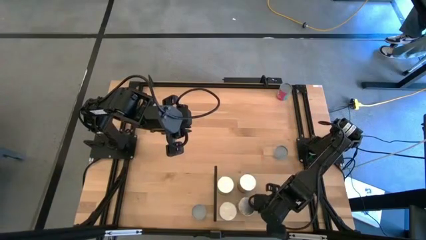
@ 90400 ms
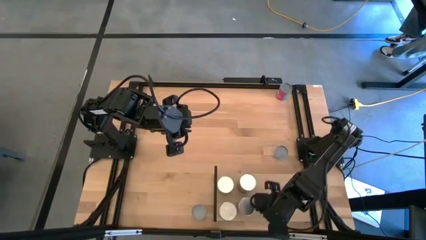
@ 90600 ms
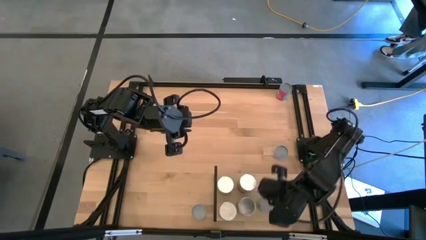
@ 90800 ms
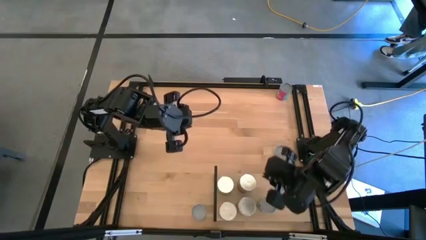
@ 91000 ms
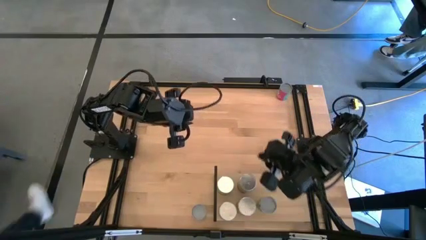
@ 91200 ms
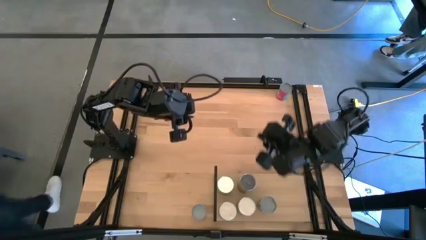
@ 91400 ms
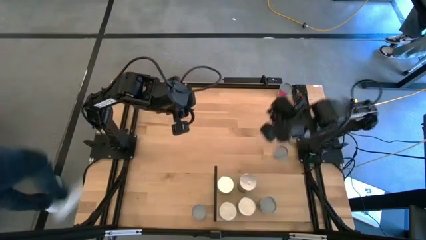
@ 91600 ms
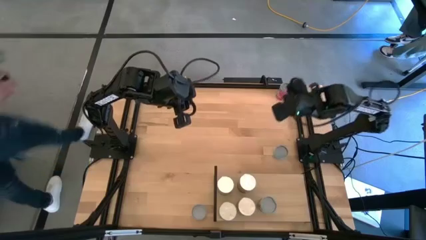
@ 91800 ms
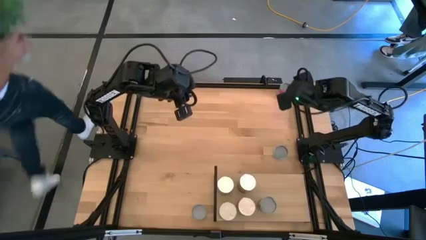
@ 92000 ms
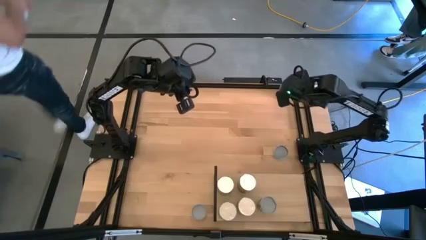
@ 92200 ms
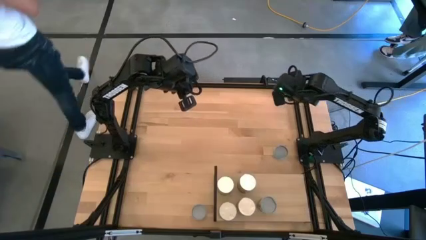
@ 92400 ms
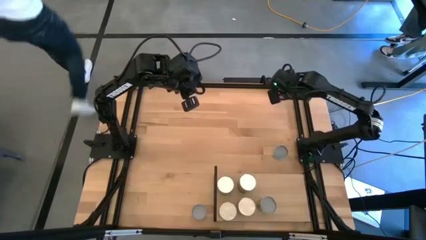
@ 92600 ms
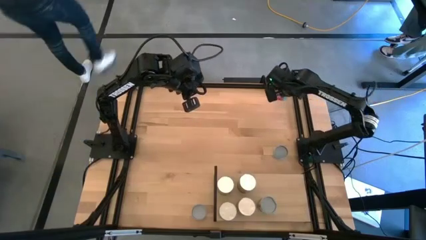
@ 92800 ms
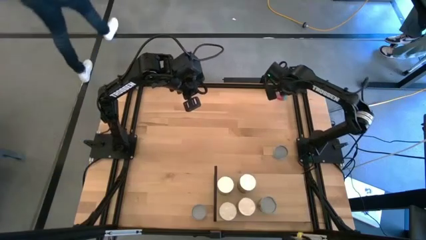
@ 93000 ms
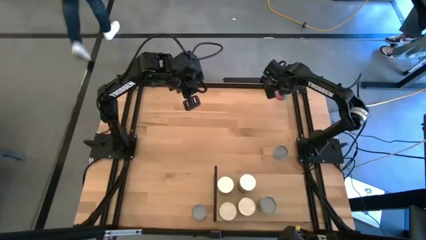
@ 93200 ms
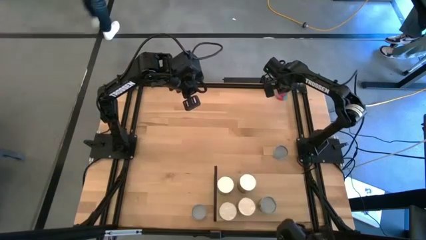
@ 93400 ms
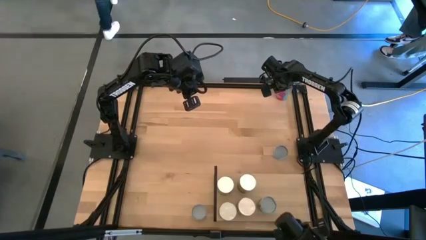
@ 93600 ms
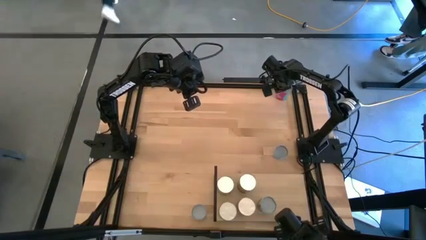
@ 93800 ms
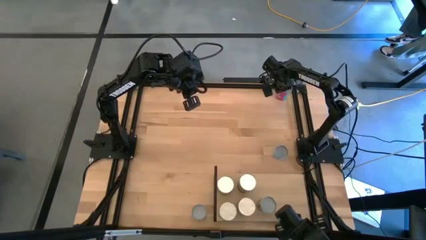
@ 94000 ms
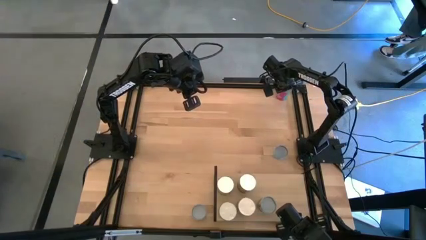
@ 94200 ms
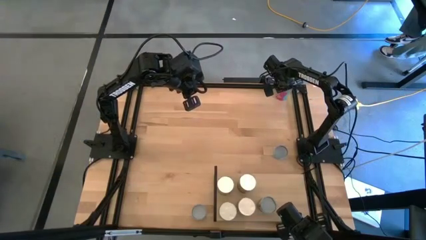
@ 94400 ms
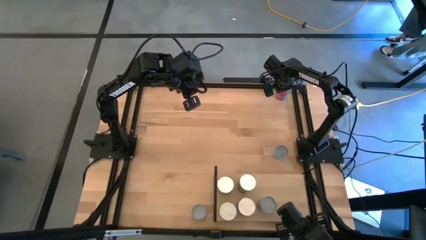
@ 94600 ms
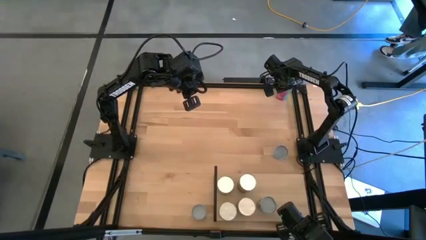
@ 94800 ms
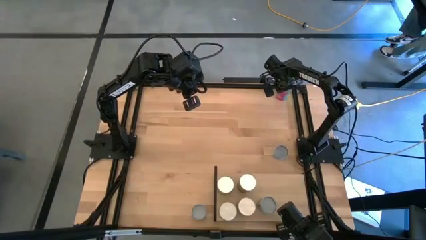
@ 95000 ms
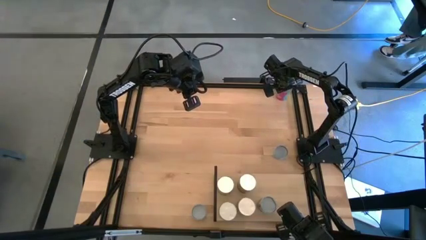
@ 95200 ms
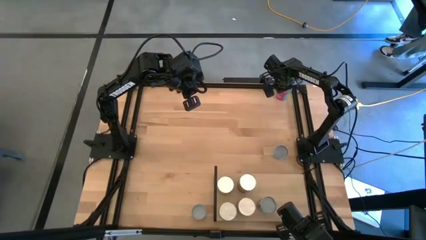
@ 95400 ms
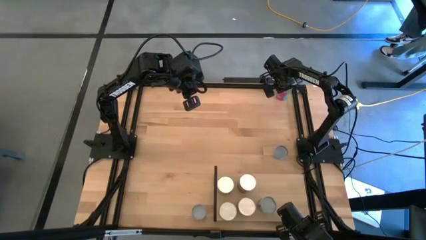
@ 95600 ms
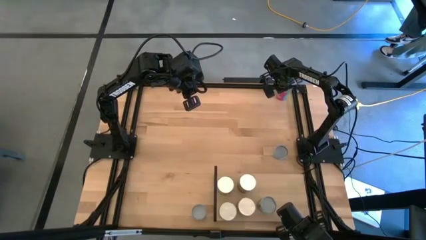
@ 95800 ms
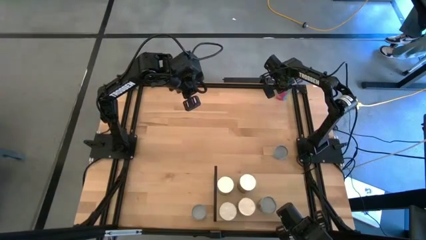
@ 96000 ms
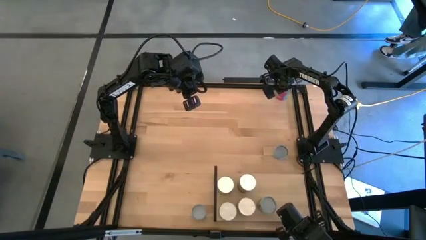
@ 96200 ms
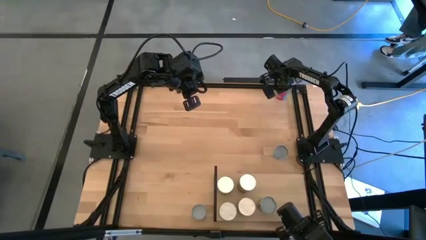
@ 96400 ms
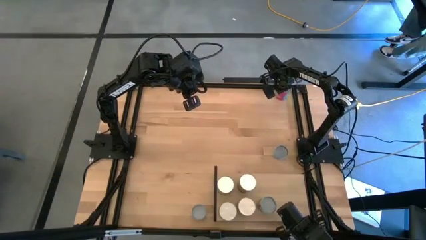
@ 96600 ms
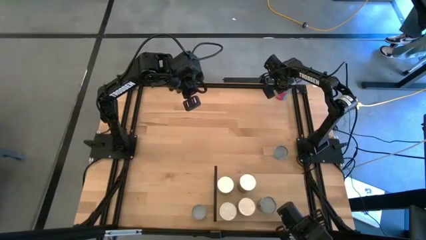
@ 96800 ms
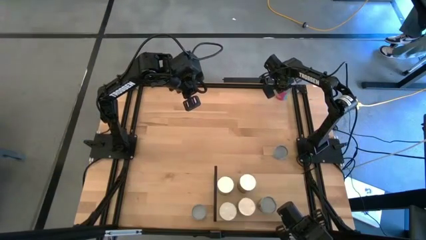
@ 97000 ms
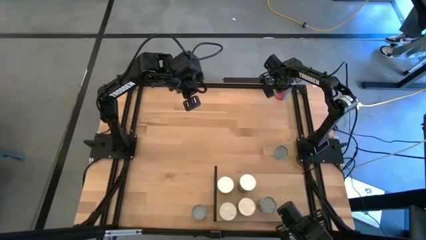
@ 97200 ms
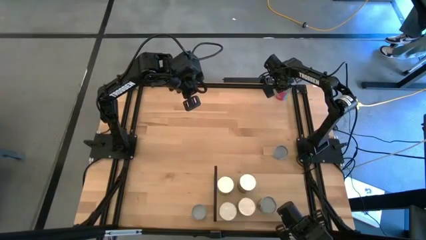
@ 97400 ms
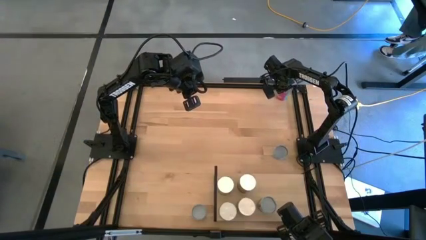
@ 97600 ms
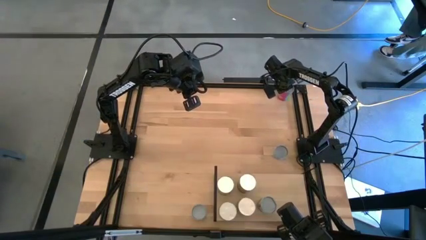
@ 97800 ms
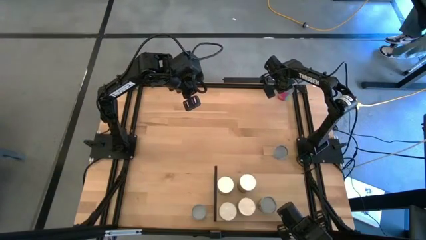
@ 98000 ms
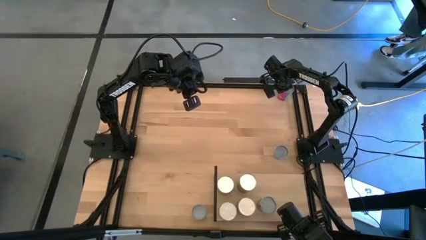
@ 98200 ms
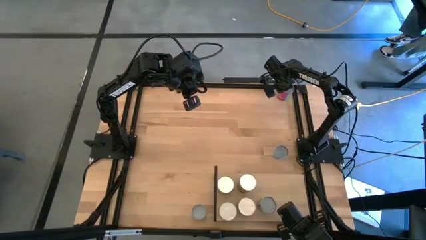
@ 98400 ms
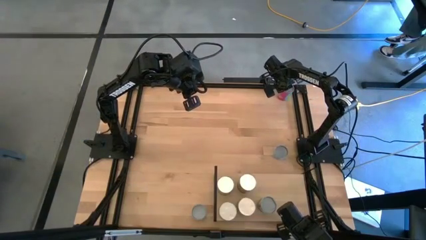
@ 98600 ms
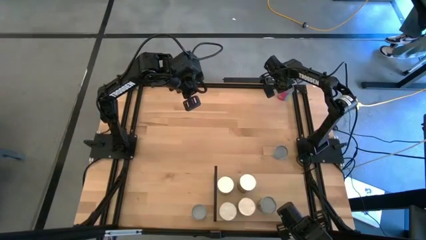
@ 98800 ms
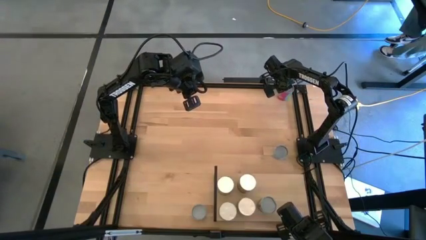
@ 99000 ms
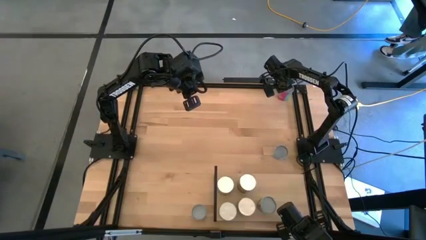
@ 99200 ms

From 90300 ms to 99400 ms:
Task: Pick and place cans onto a shelf
Put the canned chicken soup on the shelf

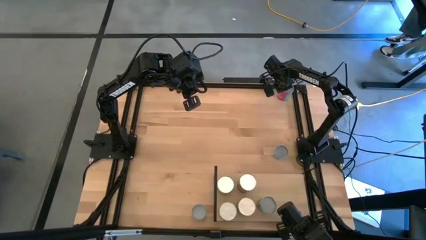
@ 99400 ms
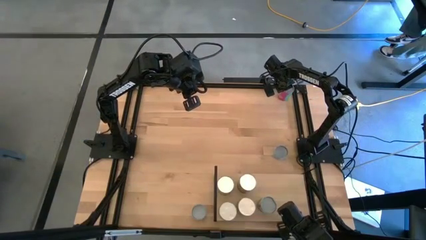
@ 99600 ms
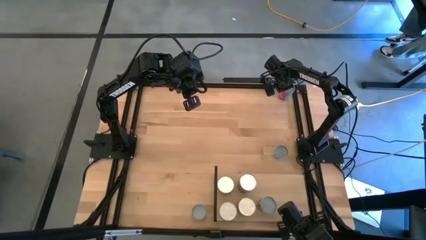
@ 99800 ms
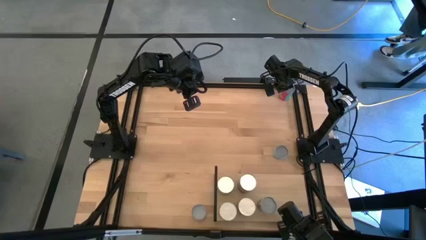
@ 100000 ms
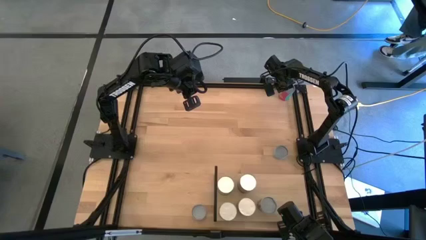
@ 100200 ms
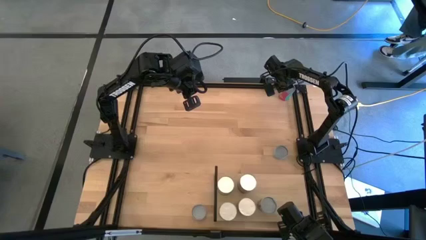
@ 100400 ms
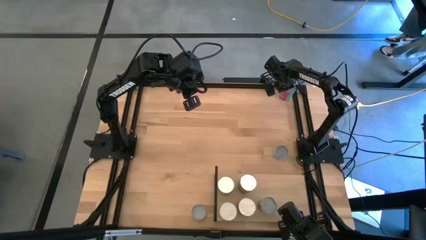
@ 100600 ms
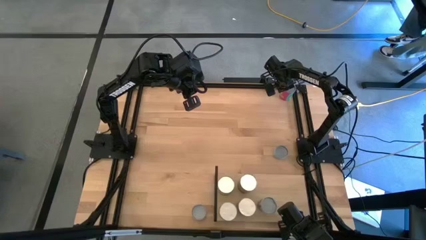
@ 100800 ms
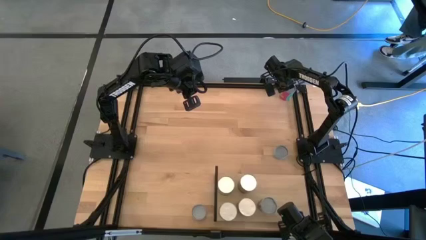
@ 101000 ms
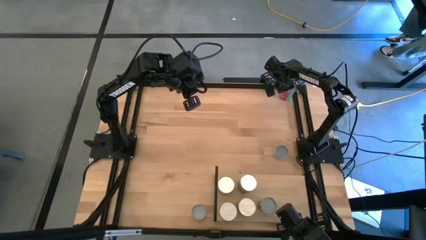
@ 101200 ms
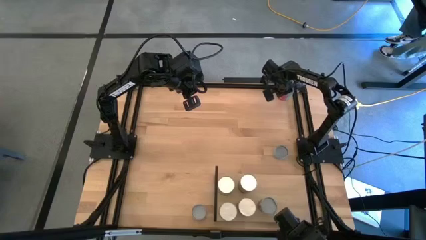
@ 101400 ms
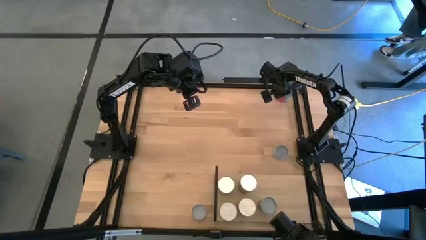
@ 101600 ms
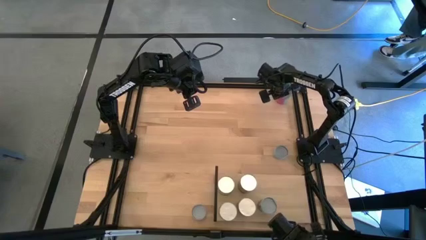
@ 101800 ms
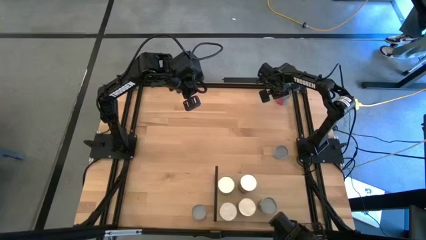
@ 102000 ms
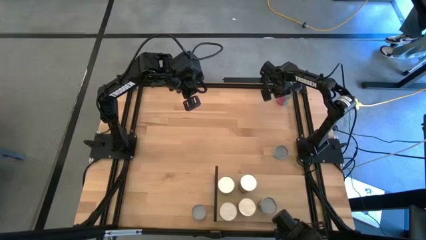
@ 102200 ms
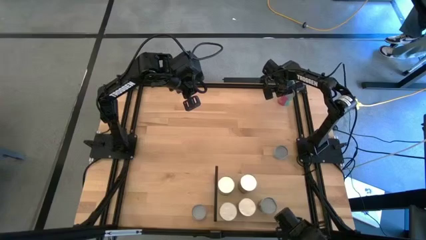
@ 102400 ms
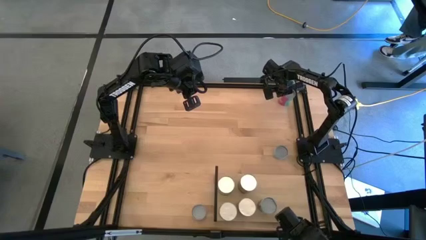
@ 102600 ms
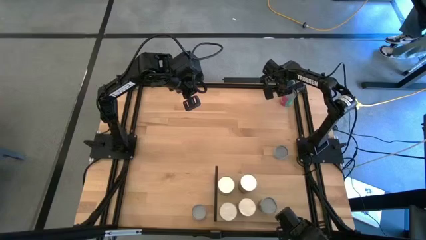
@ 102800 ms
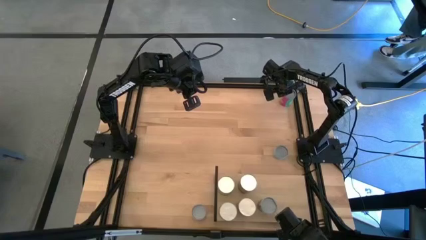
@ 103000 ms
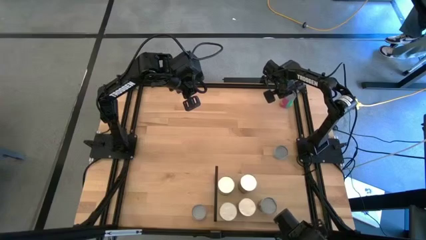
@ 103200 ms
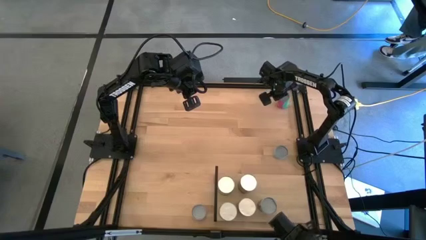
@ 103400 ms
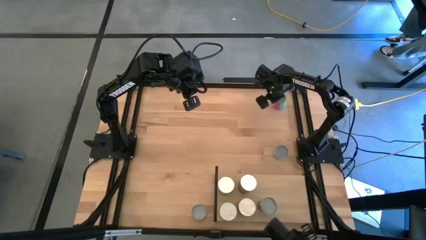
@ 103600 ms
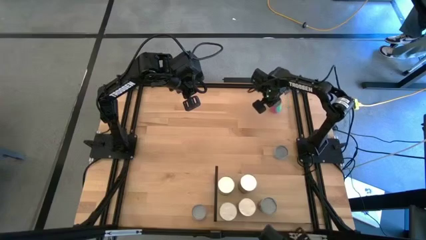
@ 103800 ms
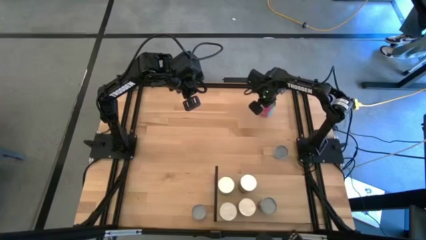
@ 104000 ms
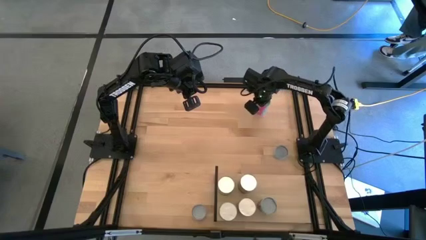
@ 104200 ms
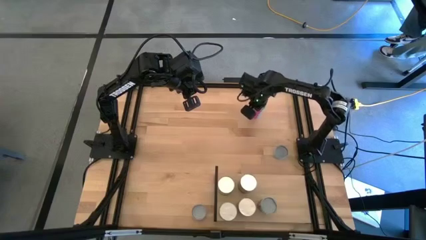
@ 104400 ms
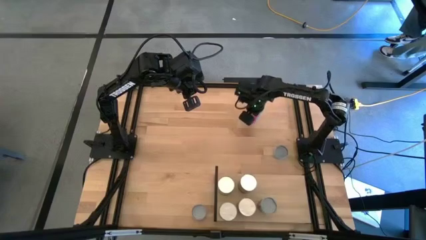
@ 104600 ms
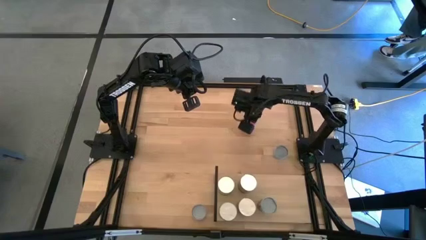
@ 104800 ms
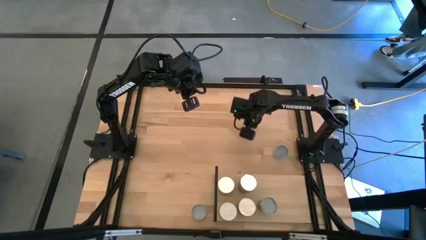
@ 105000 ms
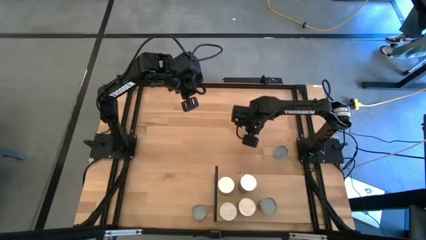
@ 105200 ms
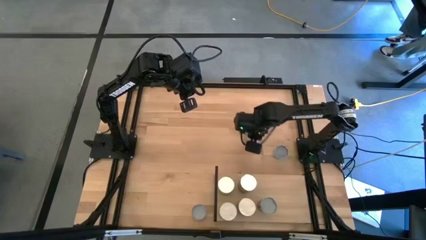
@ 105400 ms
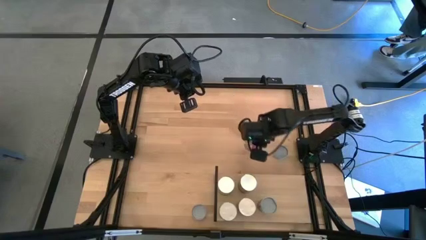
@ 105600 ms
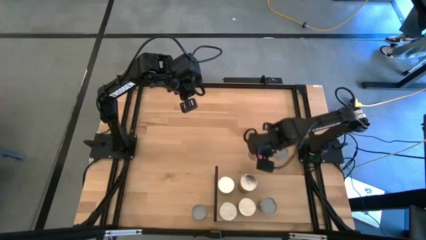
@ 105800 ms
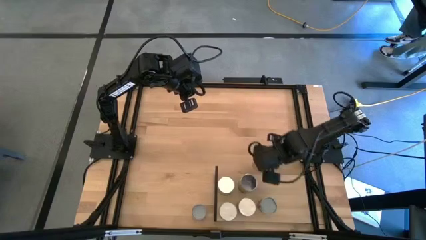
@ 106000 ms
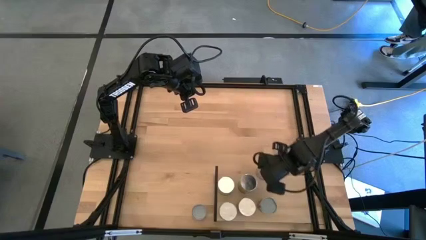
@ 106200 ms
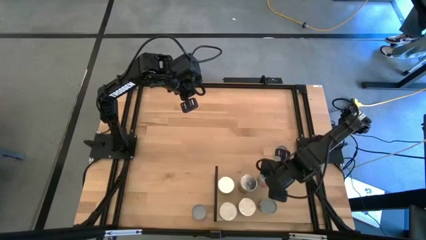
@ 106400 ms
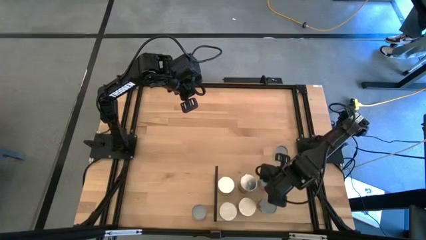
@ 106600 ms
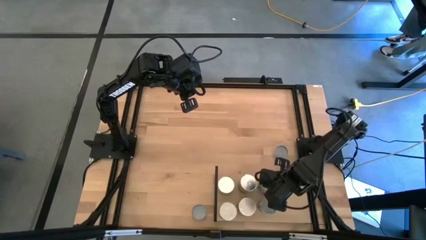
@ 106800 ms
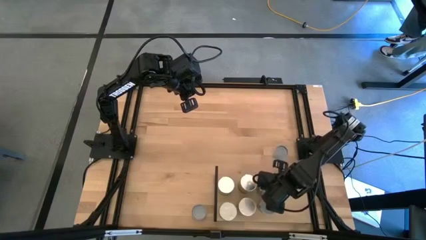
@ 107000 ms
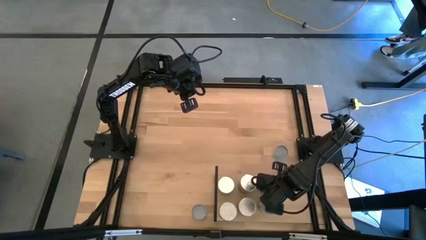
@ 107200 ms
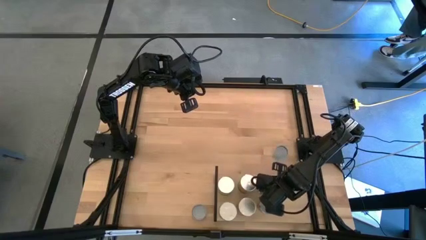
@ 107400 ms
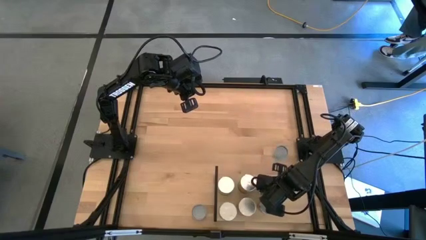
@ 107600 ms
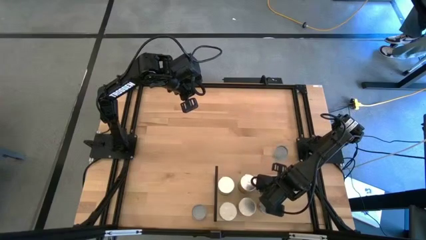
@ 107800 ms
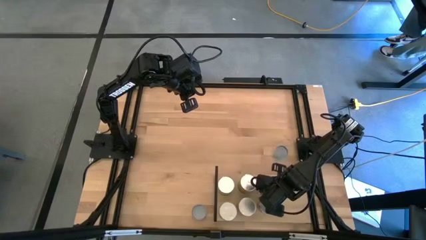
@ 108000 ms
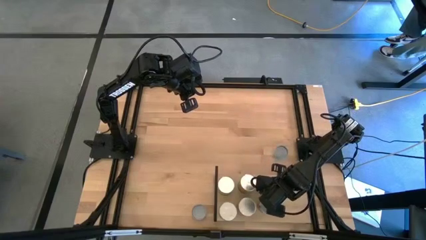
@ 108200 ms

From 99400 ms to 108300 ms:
Put the canned chicken soup on the shelf
